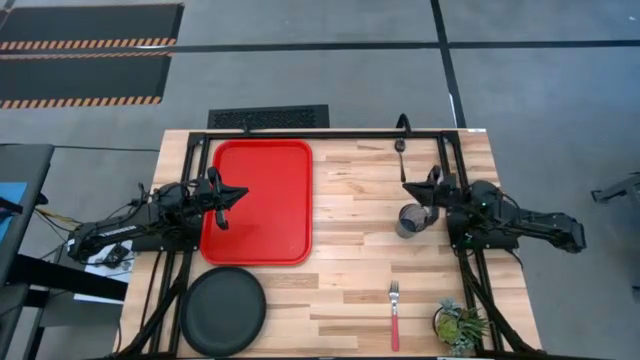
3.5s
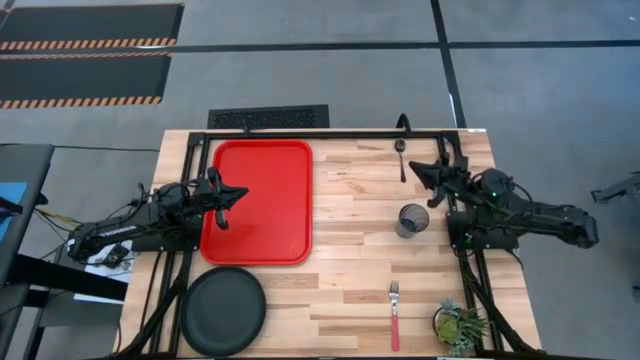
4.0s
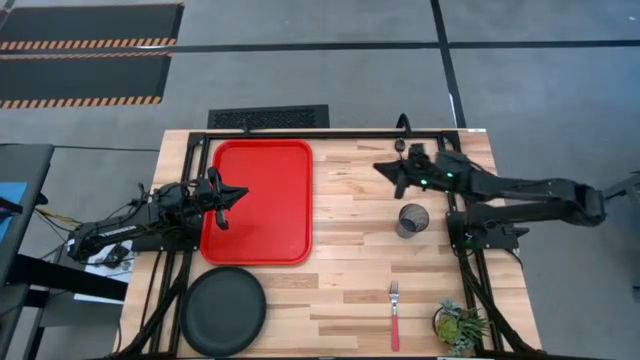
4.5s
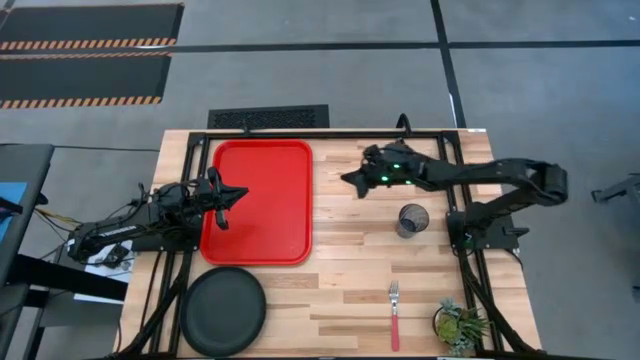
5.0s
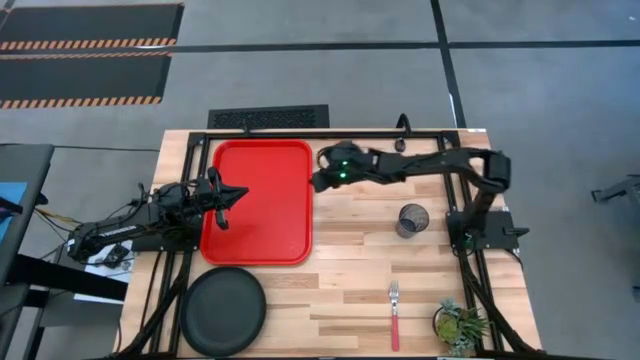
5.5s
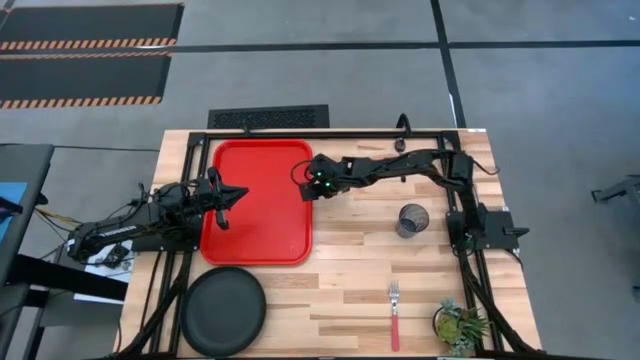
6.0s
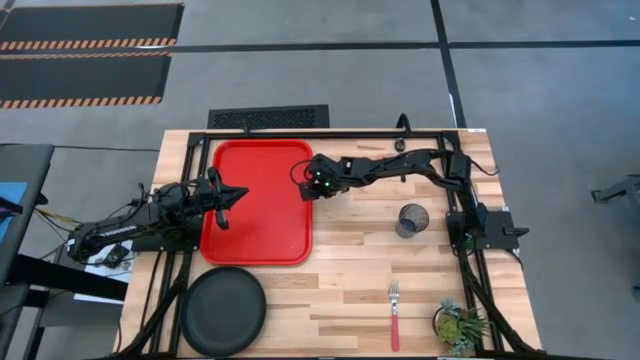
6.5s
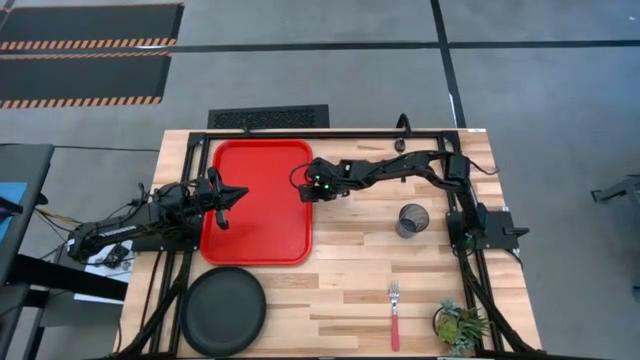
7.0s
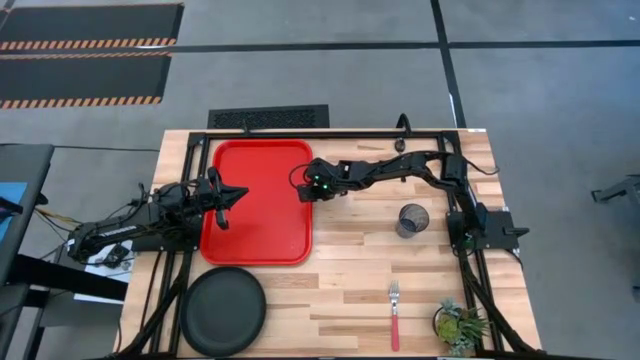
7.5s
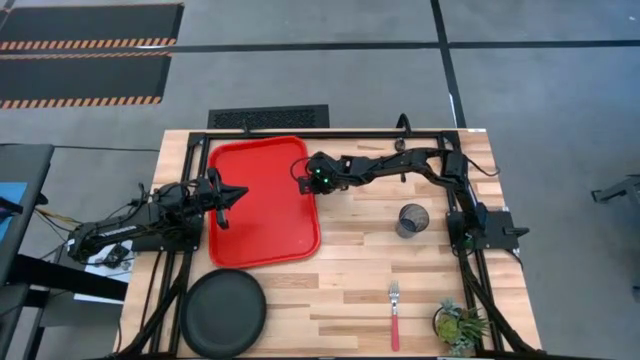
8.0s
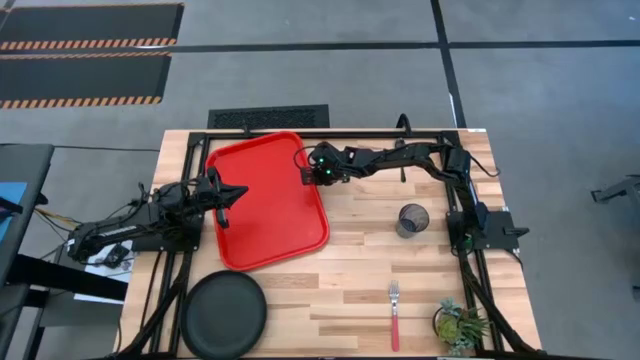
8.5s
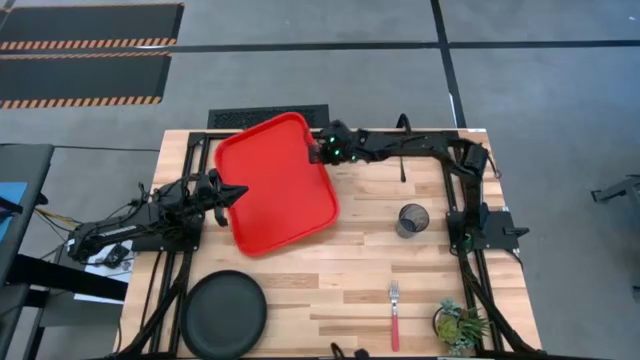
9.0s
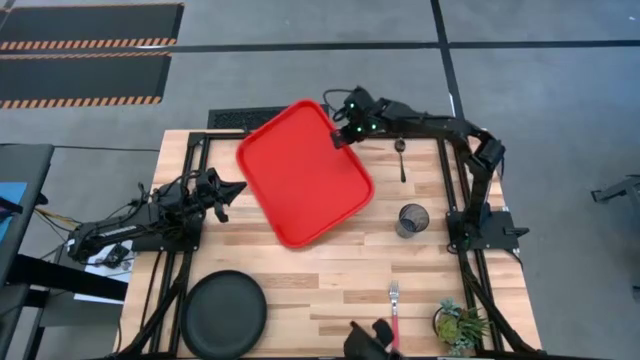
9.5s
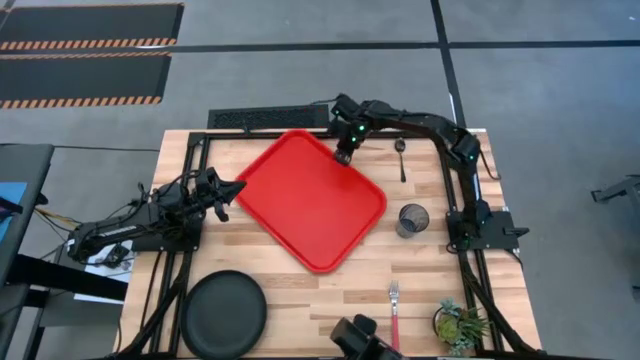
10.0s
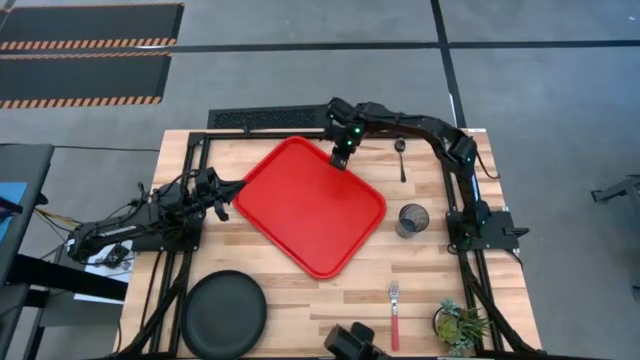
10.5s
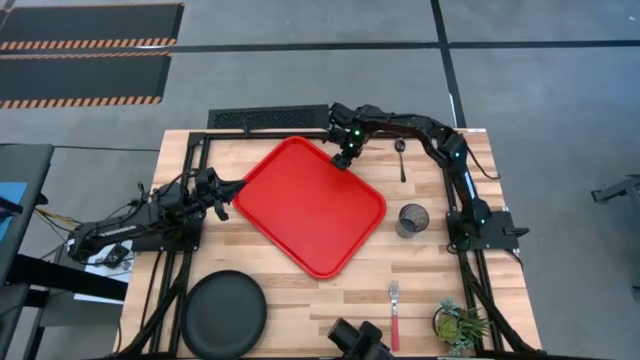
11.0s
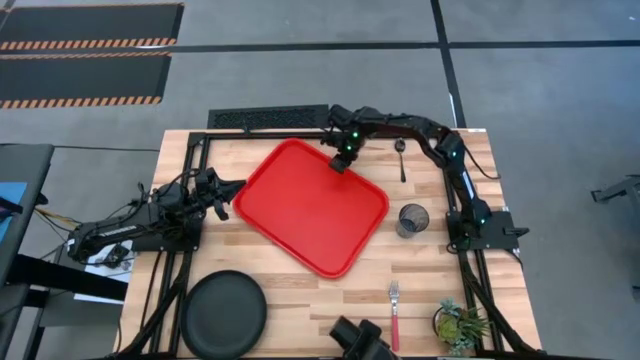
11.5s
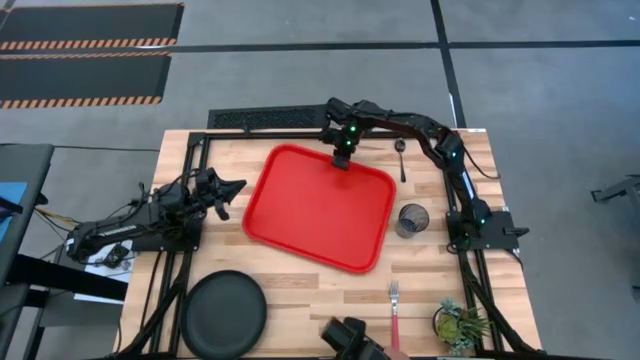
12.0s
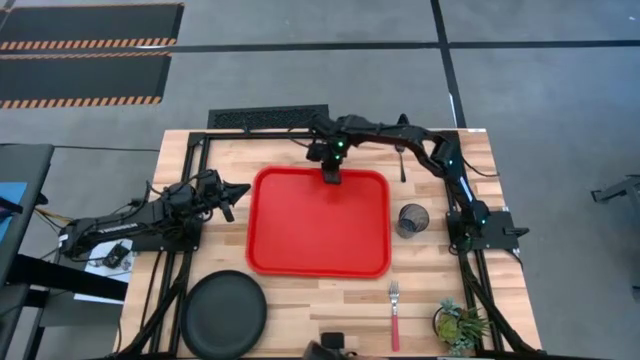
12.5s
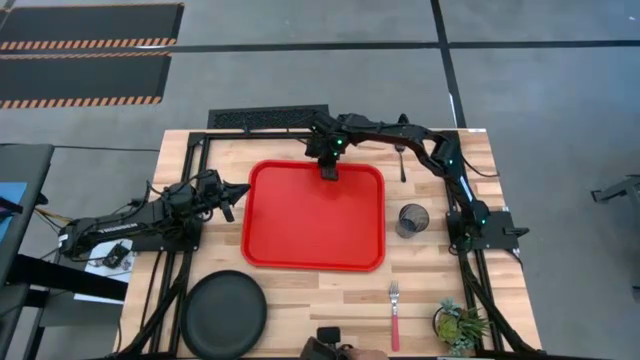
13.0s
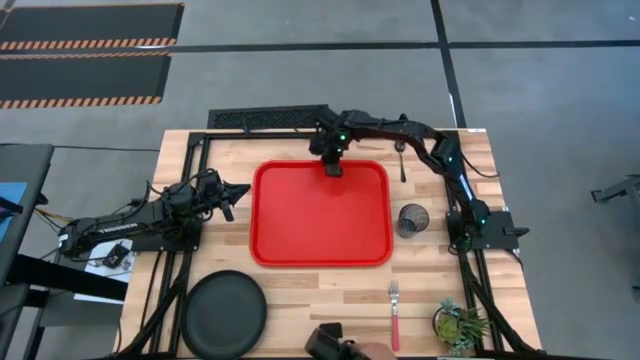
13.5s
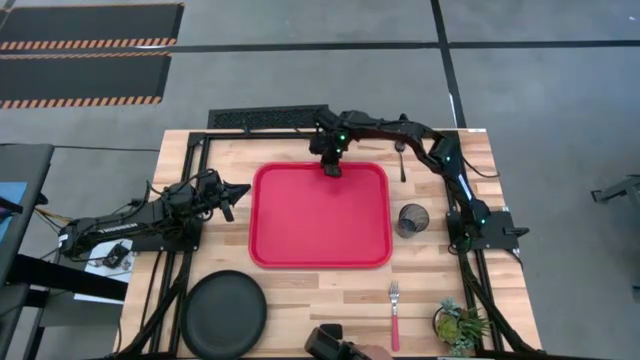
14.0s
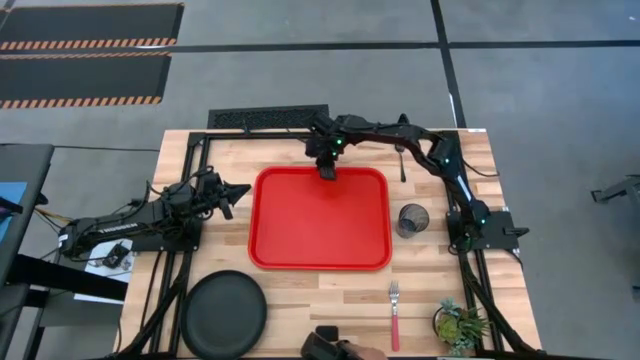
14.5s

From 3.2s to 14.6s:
Task: Pick and place plate/cup/fork/spoon on tray
Prepare the red tray in the middle of the table

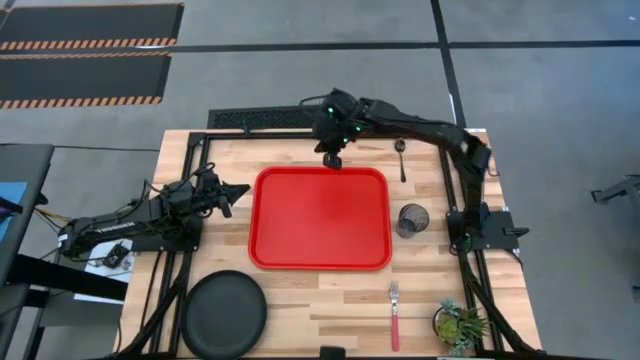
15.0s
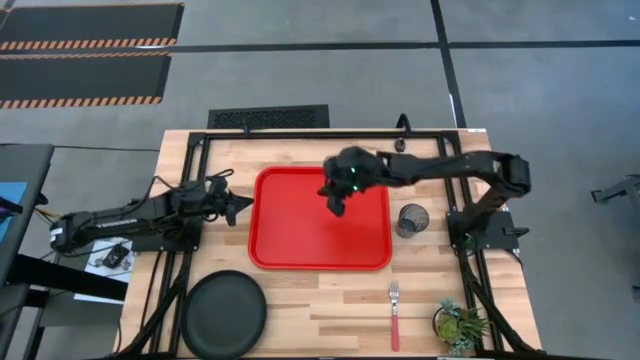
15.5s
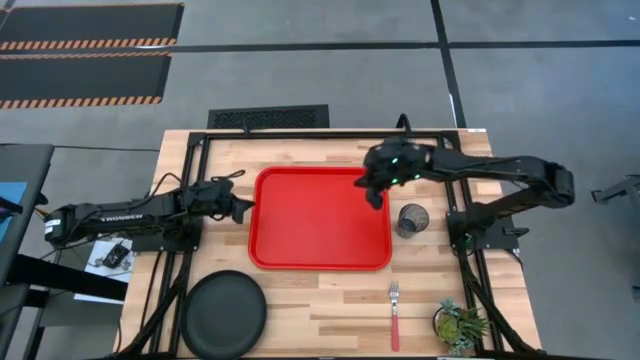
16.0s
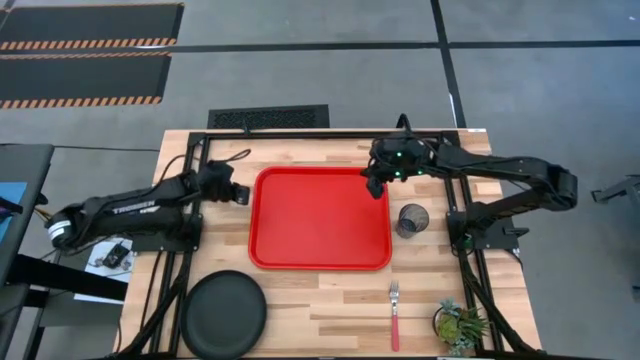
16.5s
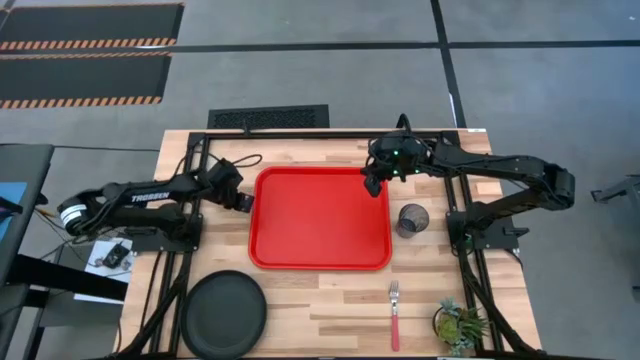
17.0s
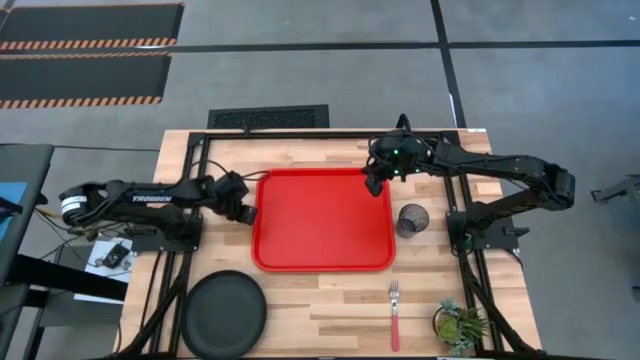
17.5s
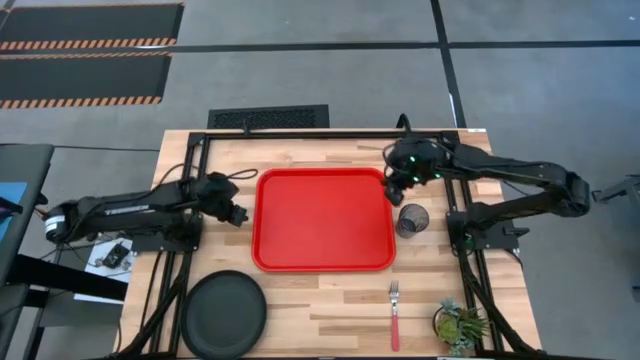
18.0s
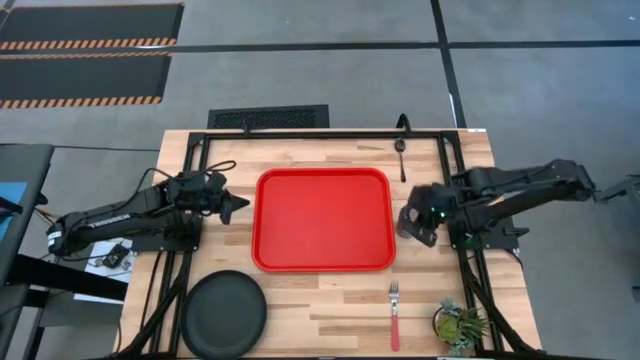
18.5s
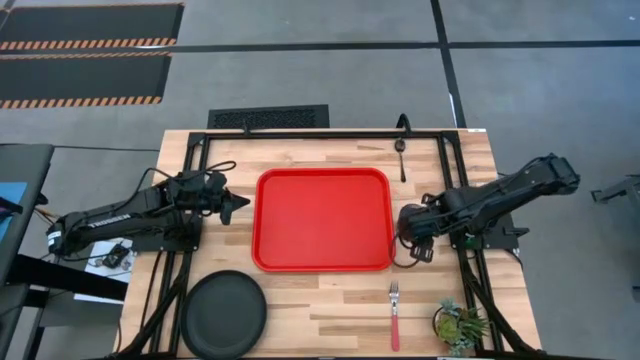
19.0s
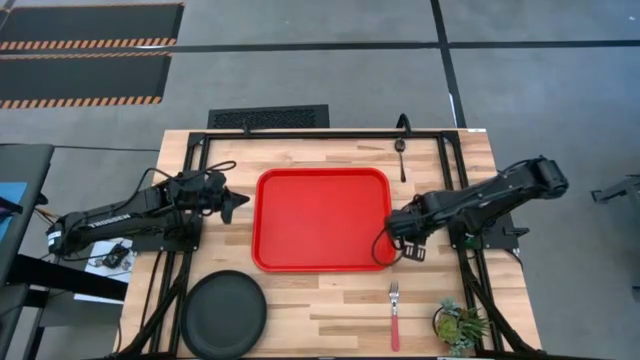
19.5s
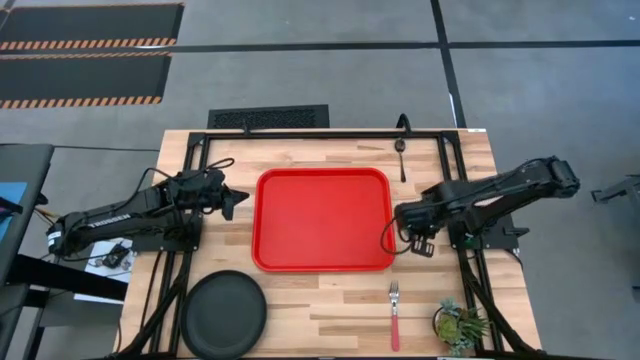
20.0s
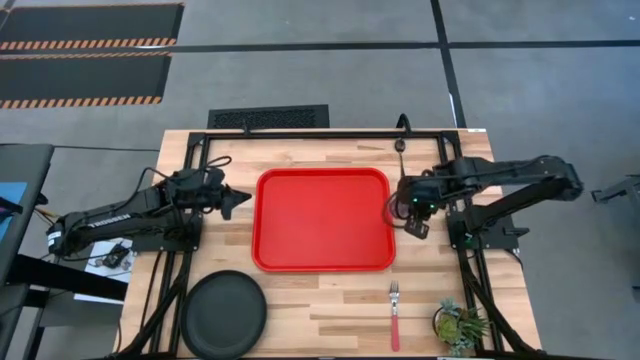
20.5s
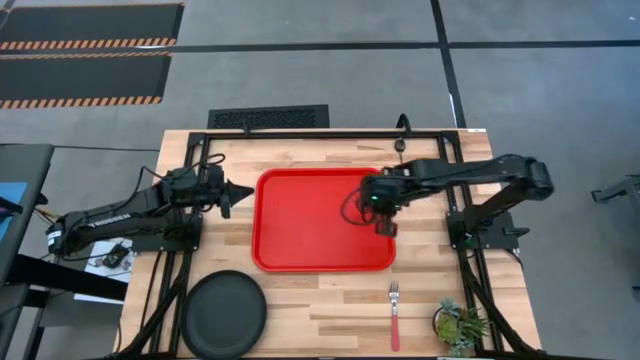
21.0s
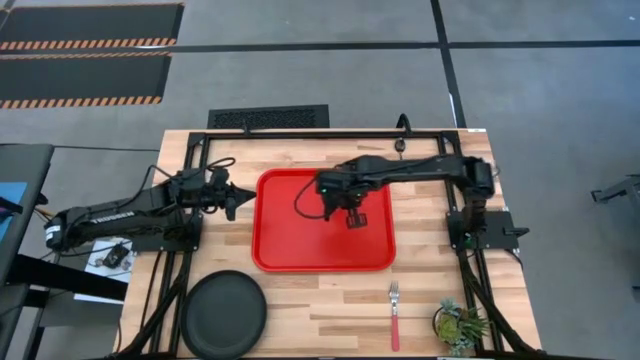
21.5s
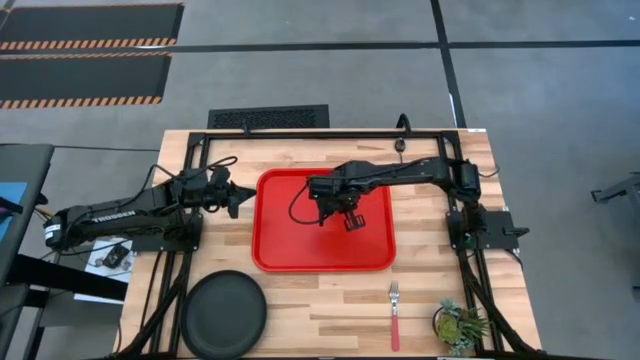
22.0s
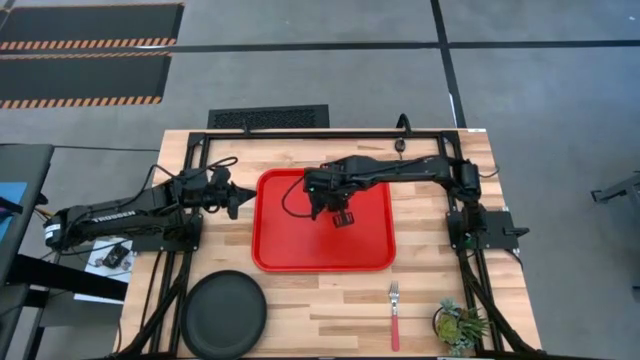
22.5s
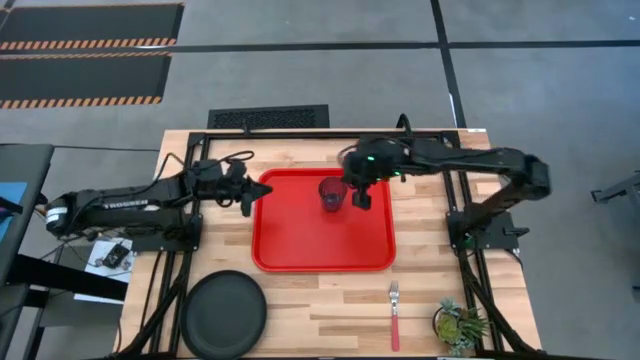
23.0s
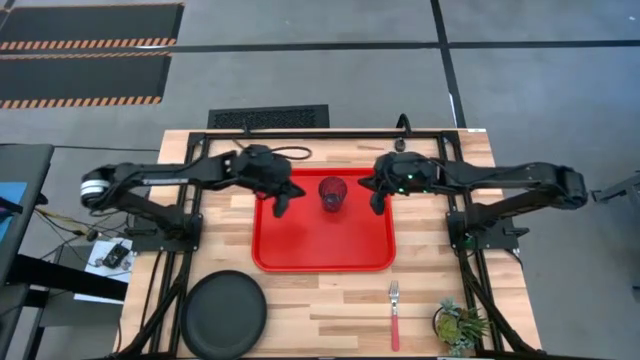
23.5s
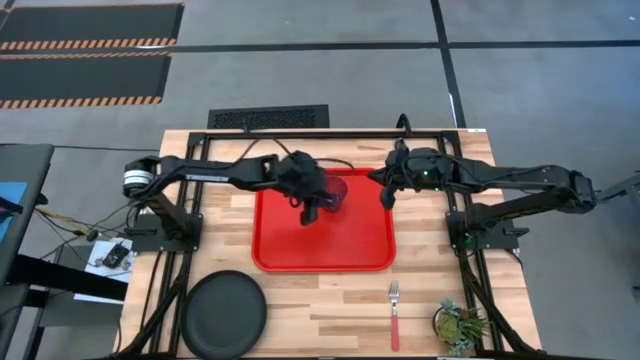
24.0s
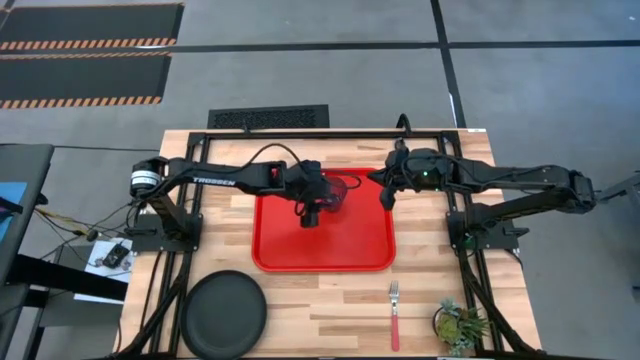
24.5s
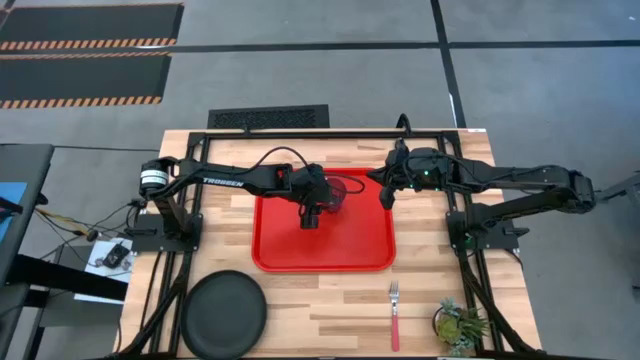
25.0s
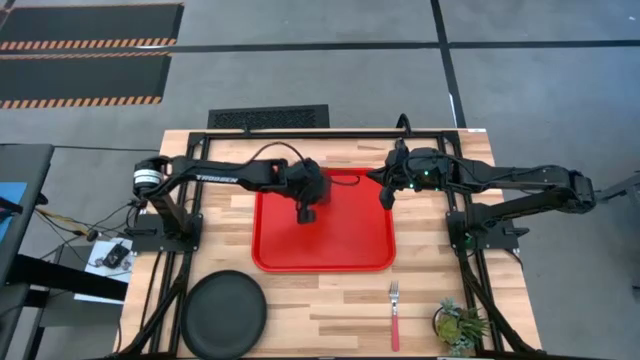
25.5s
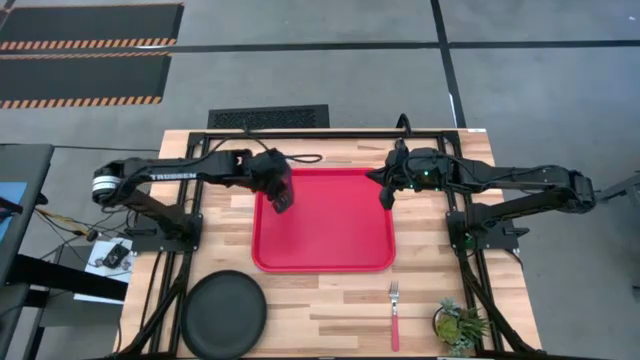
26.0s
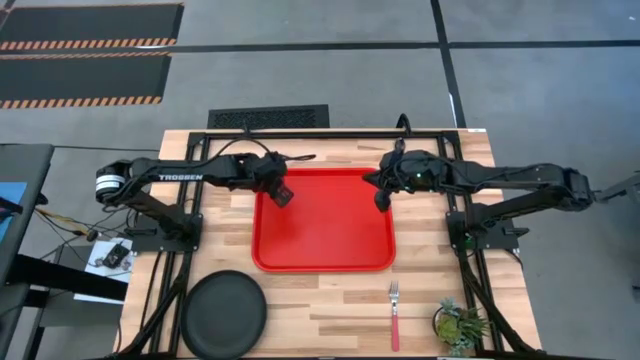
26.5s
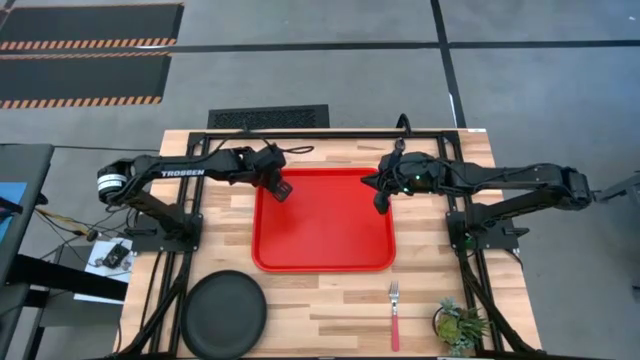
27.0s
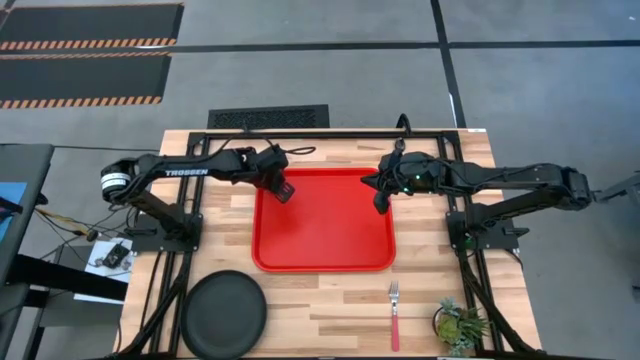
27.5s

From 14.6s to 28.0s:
Put the glass cup at the top left of the red tray
